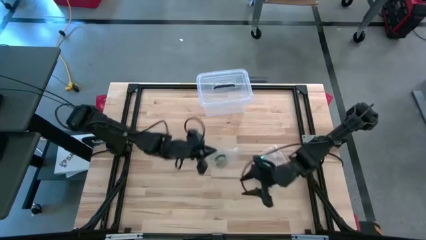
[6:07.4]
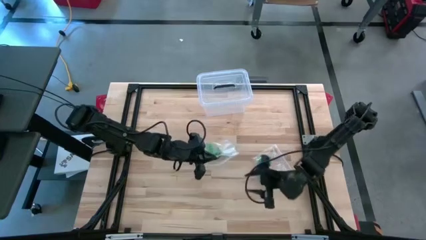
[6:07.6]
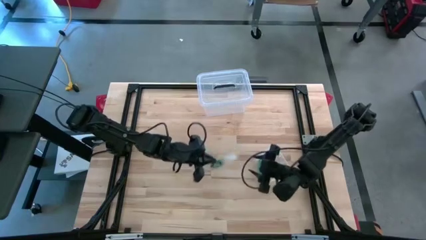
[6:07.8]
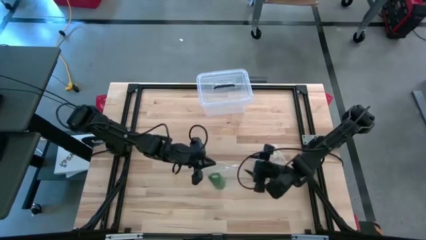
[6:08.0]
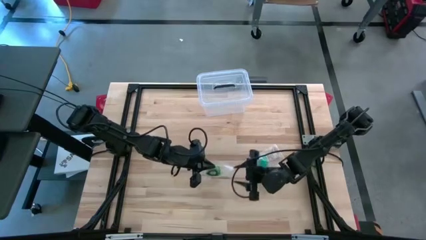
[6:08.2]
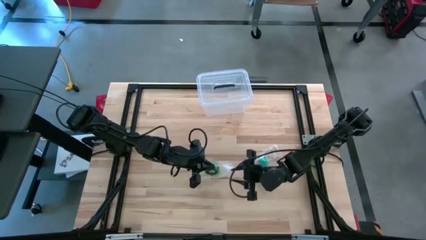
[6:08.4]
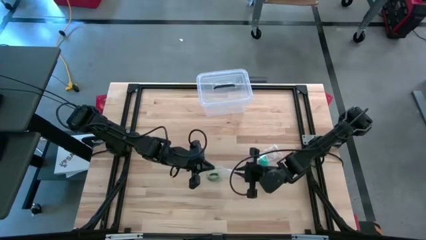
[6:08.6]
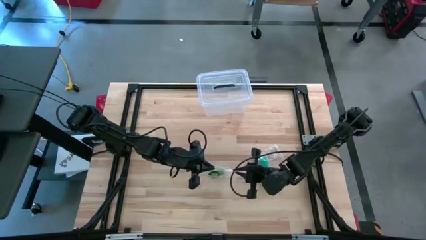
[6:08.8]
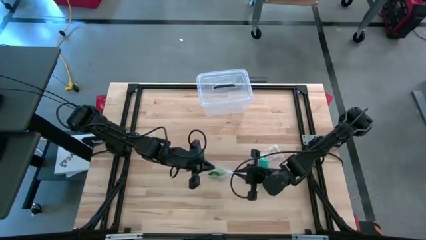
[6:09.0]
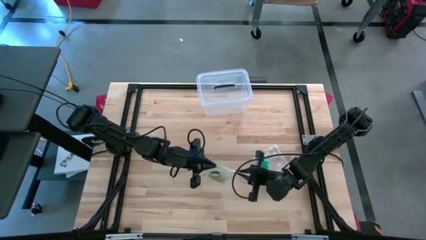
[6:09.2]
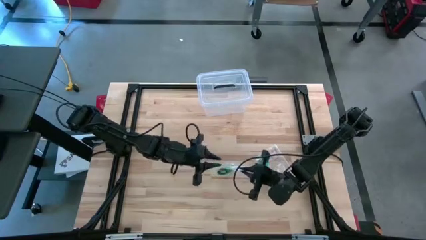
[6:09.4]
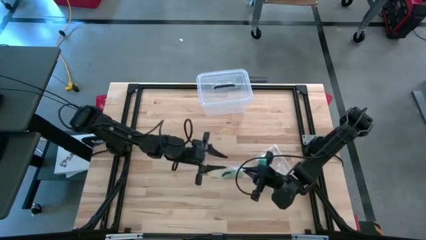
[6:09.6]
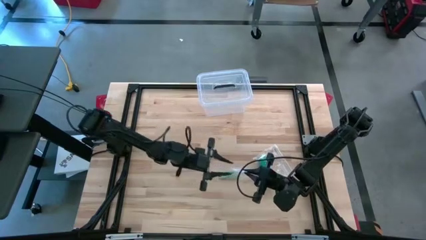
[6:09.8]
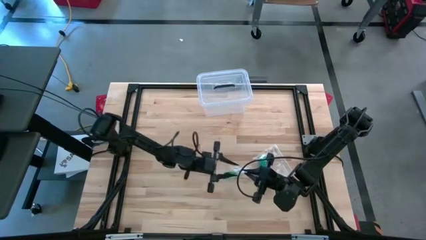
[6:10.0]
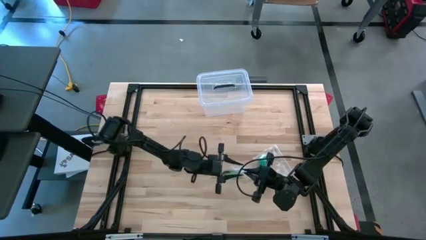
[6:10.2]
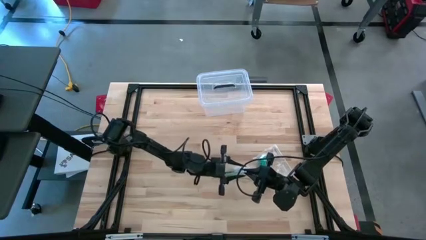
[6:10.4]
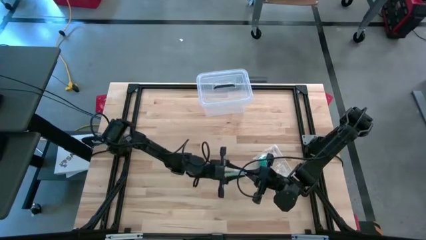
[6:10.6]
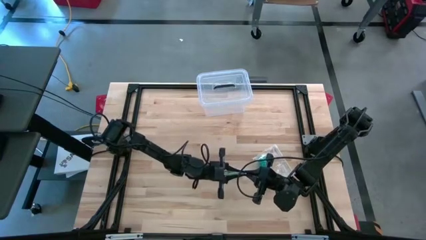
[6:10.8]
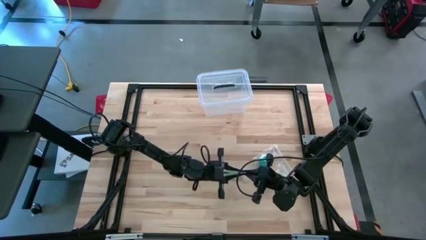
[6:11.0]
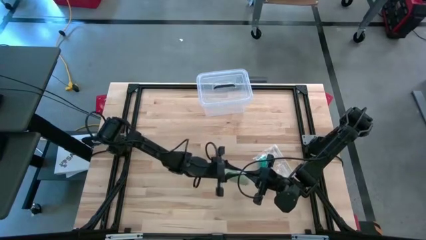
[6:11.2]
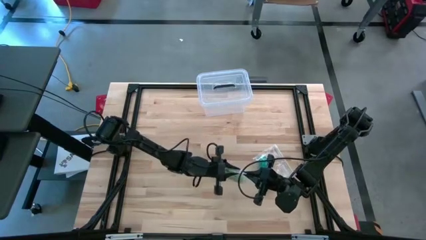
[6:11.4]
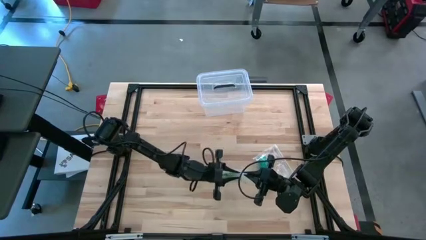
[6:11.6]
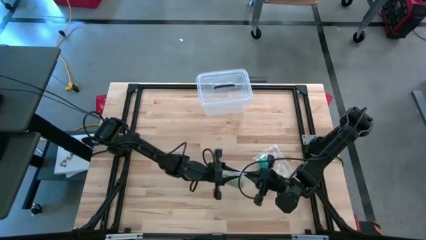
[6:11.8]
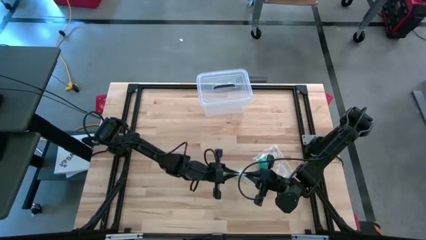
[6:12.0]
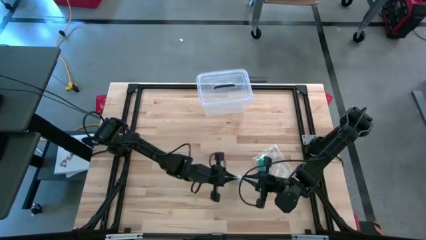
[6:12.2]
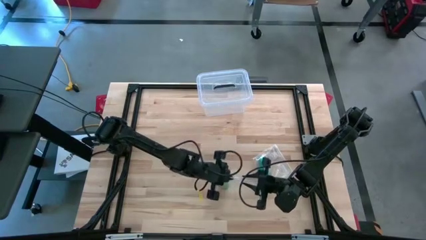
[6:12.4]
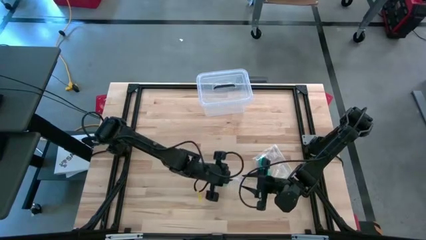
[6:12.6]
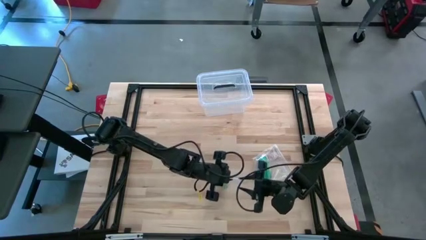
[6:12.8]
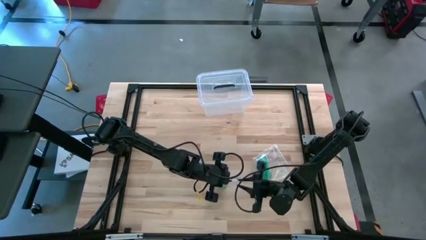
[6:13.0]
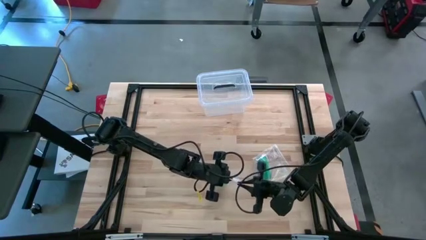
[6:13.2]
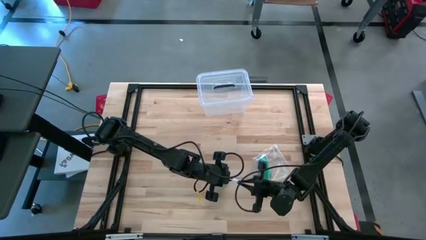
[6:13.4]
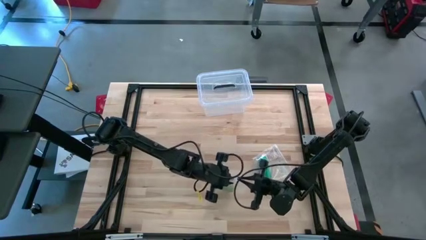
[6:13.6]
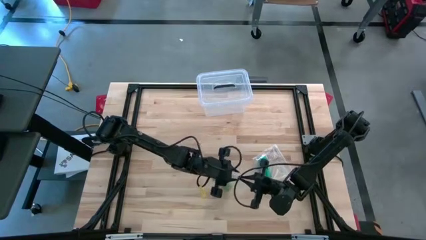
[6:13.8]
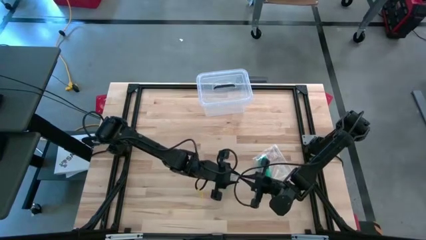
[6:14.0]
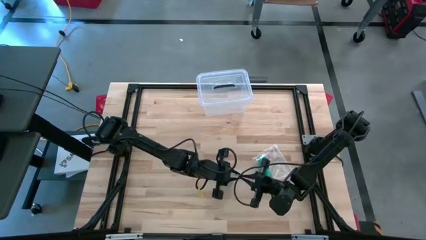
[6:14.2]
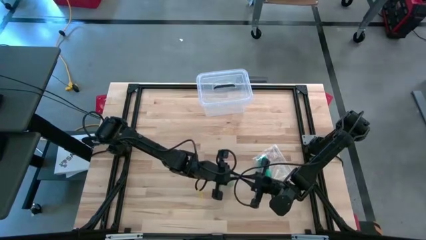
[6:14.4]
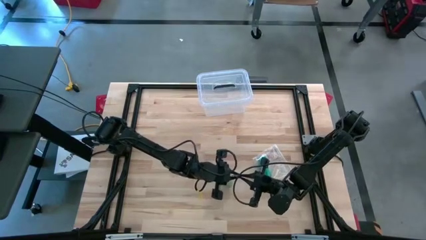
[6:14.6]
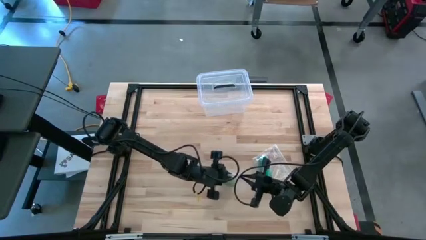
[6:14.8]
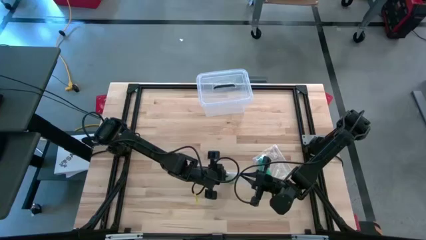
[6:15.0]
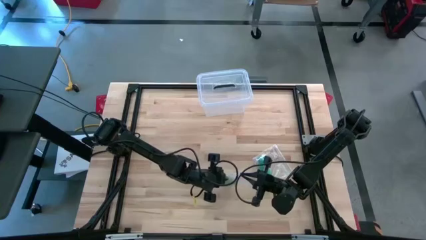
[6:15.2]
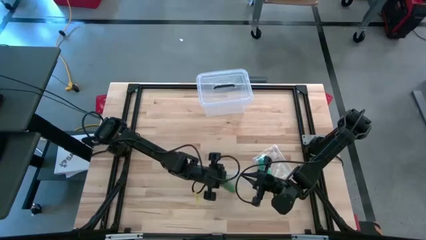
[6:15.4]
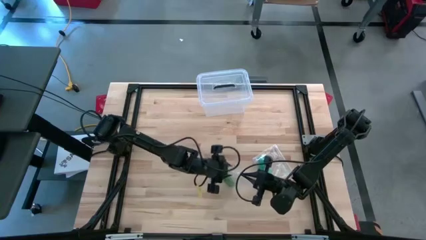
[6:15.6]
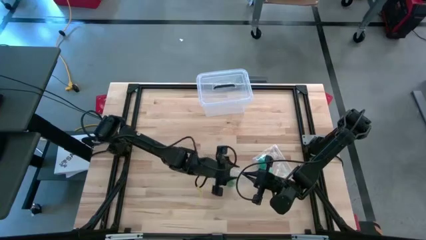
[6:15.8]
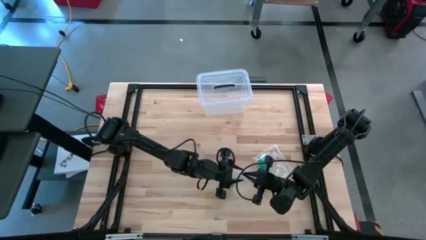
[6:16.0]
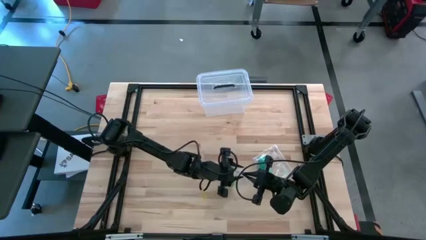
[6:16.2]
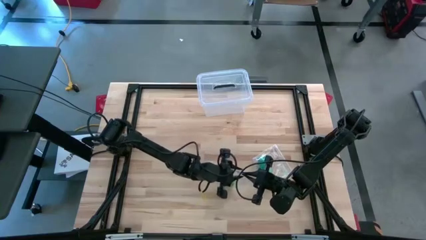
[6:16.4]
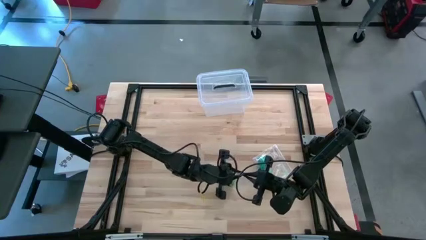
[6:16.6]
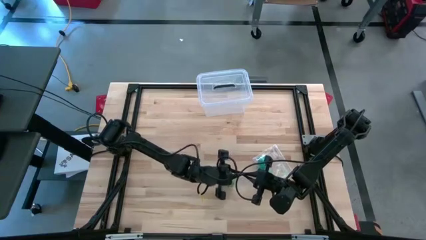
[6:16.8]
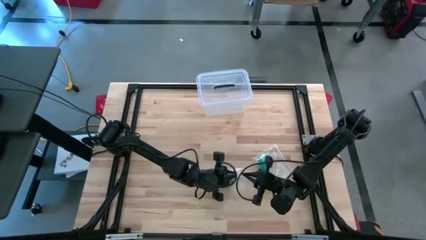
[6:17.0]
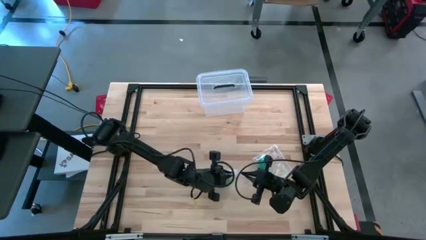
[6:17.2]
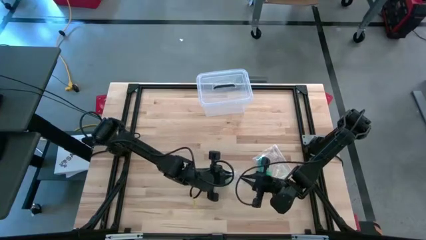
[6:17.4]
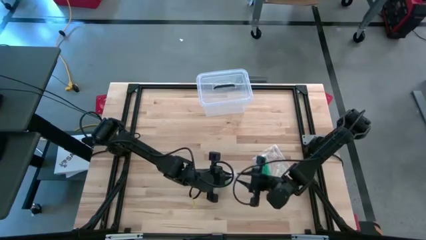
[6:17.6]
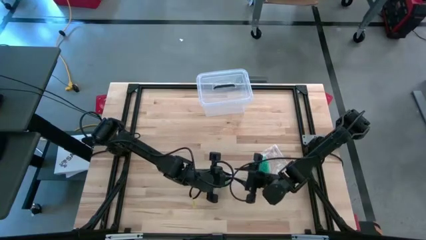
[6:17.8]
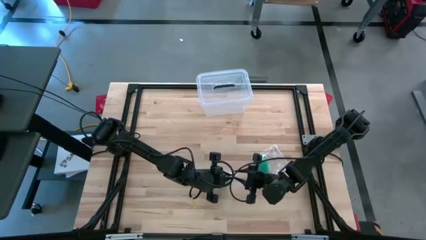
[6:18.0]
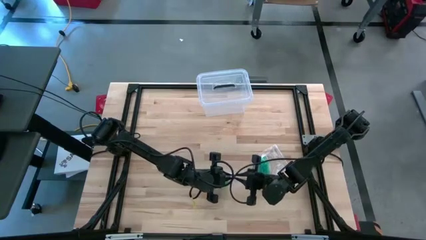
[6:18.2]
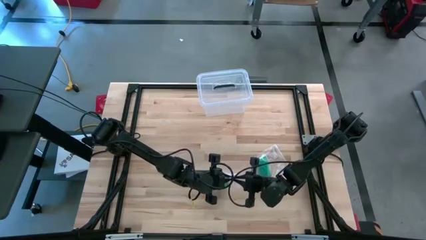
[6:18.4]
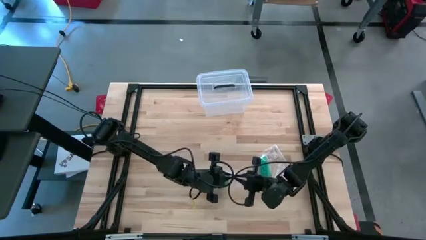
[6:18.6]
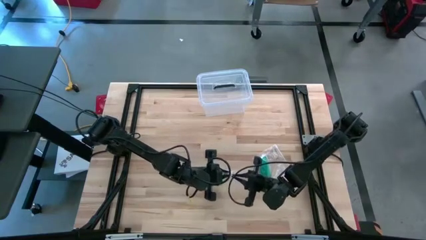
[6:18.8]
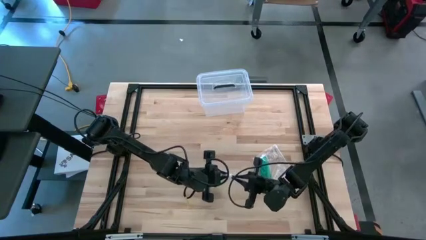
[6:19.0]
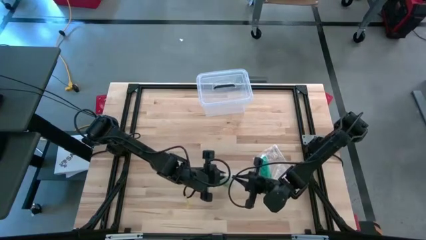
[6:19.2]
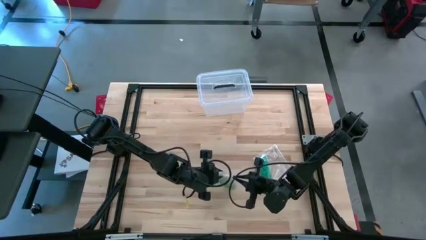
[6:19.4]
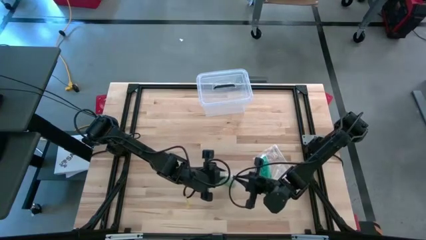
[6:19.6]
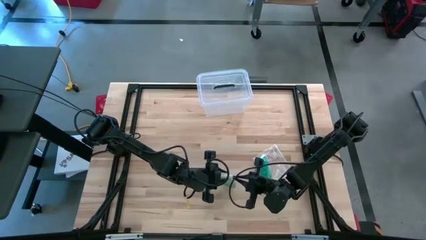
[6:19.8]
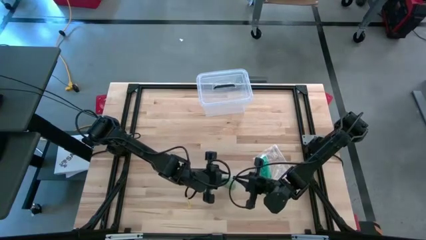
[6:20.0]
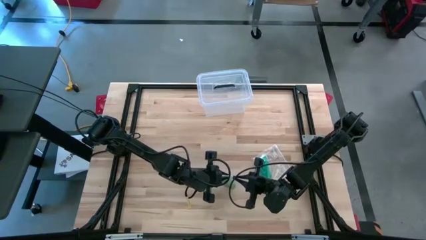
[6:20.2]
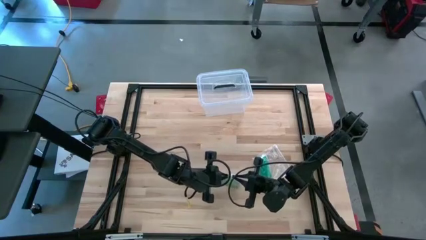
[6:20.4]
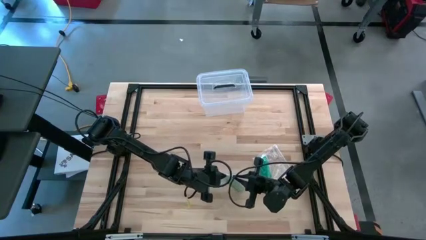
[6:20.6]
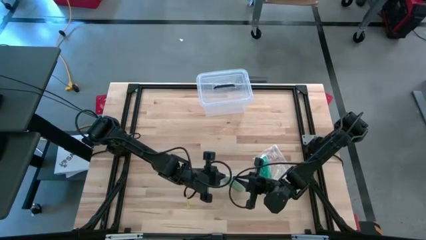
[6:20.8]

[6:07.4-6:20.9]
Task: Roll bandage
Close the transparent zip bag

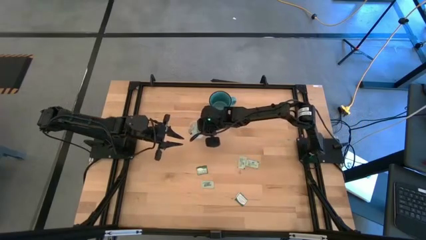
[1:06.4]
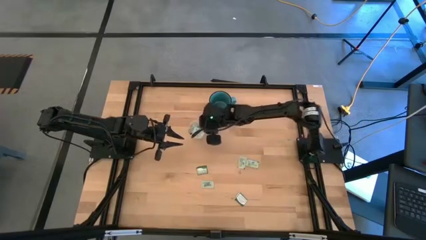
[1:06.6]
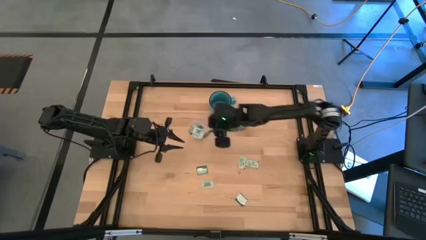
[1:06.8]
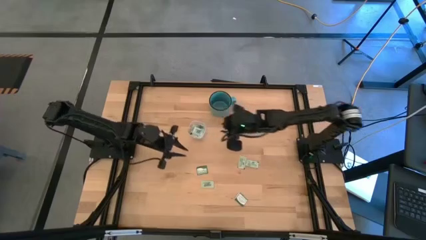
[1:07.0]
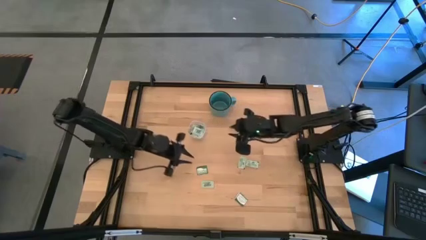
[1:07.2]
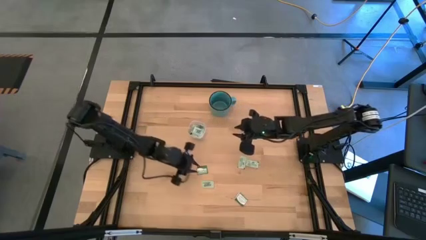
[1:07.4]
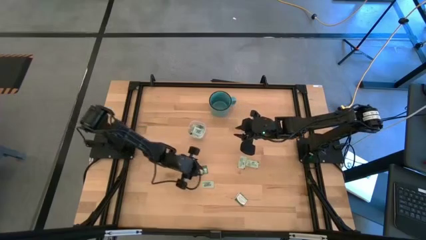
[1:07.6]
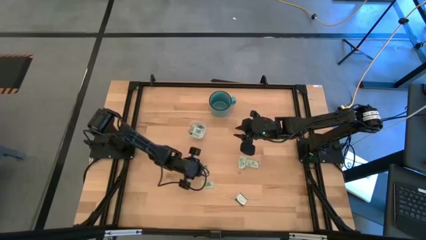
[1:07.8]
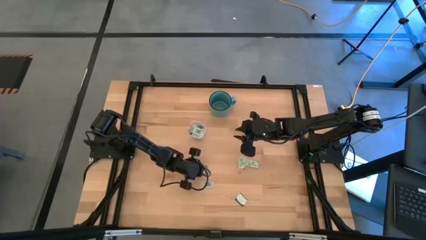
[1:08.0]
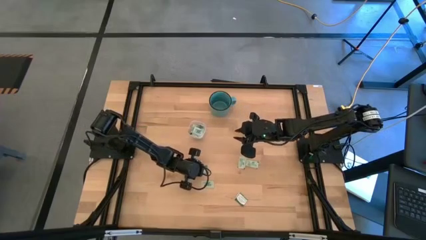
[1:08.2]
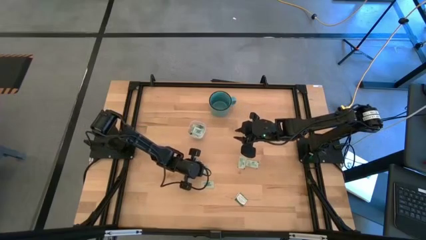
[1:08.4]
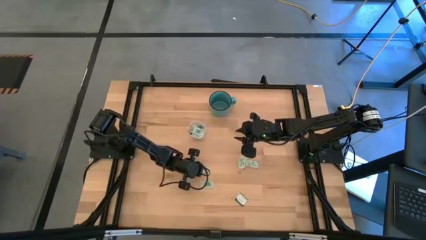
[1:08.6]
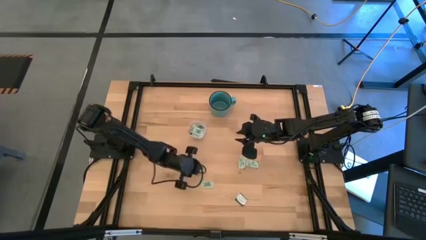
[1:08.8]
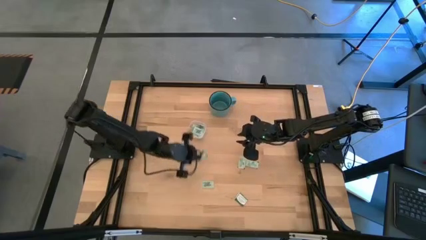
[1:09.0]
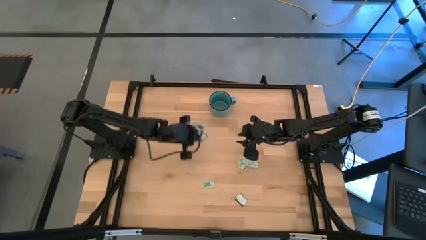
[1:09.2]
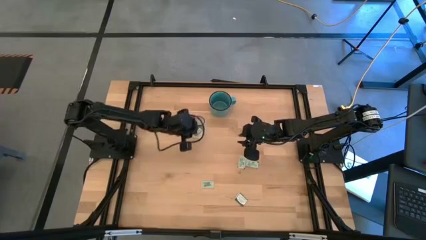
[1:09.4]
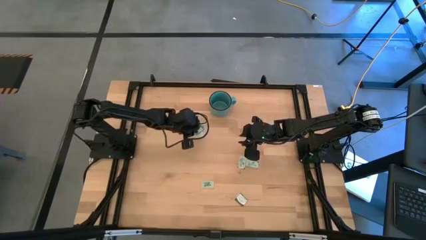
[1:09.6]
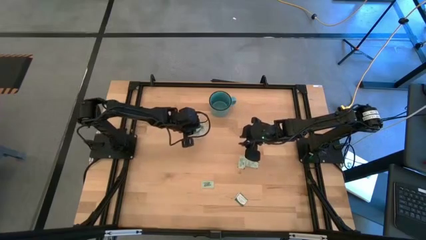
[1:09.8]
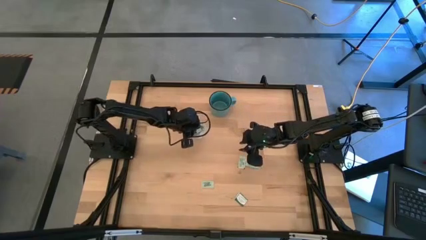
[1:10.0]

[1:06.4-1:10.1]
Task: Pick and place Stevia / Truvia into bins
Put the dark green truvia packet into the transparent container
